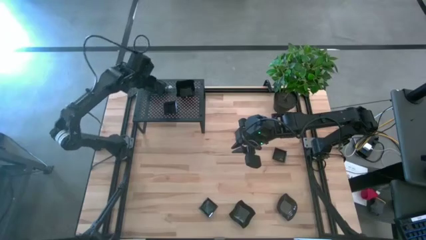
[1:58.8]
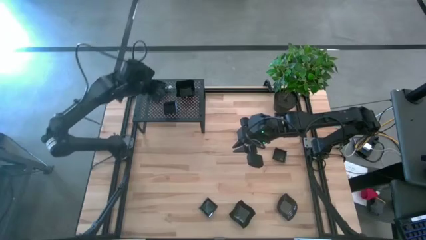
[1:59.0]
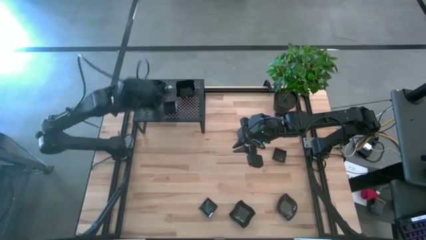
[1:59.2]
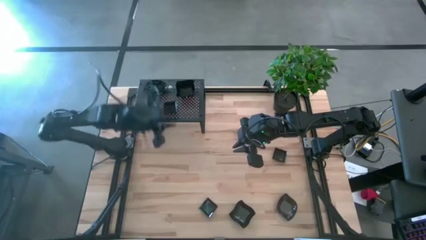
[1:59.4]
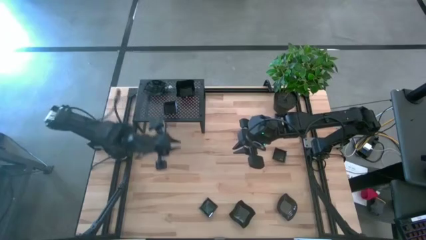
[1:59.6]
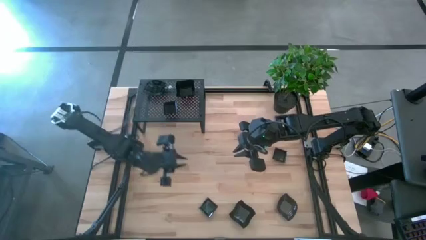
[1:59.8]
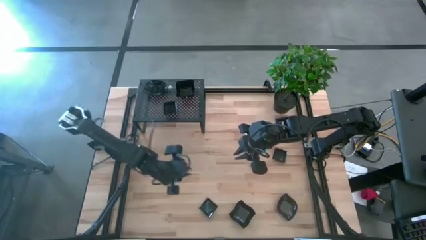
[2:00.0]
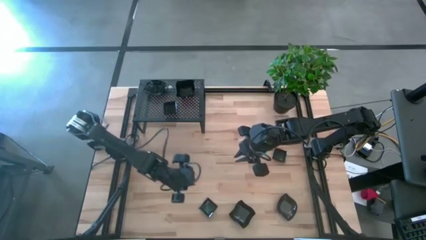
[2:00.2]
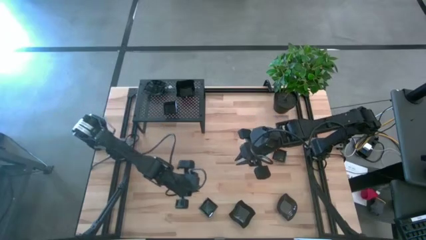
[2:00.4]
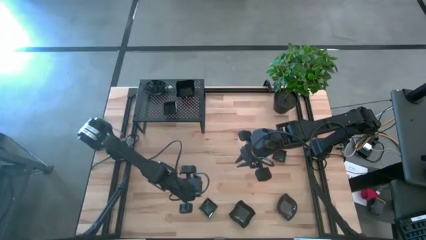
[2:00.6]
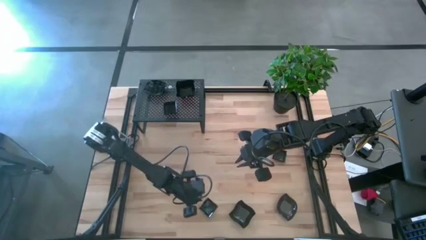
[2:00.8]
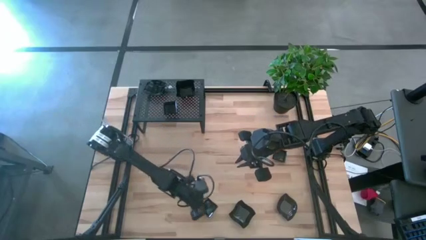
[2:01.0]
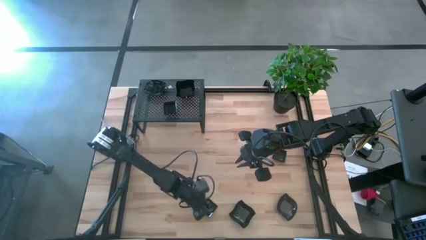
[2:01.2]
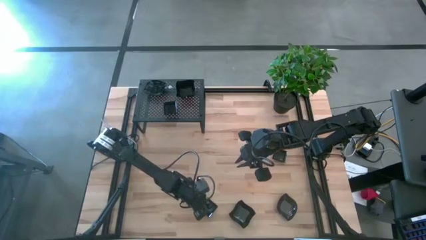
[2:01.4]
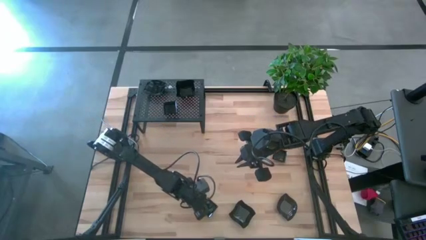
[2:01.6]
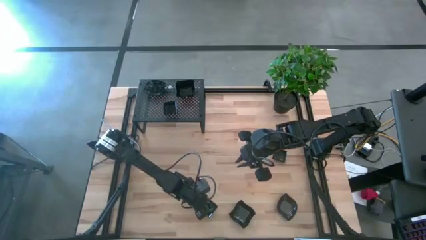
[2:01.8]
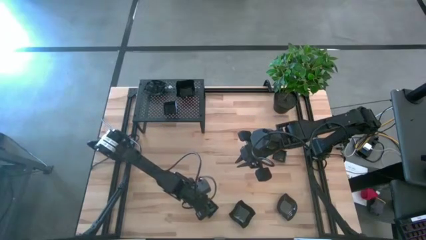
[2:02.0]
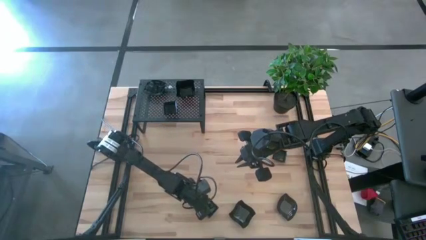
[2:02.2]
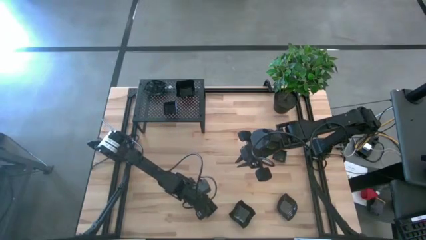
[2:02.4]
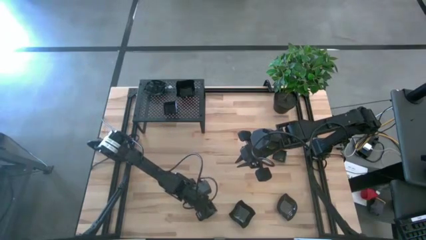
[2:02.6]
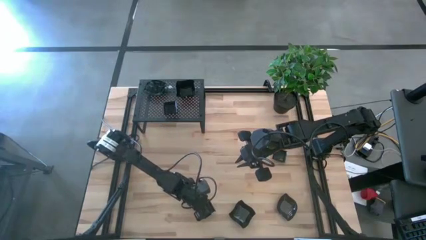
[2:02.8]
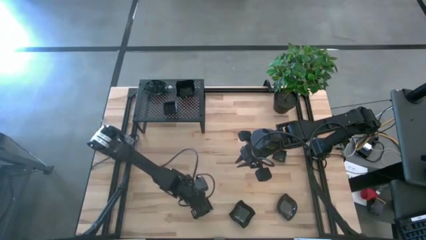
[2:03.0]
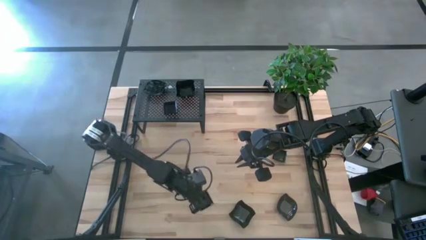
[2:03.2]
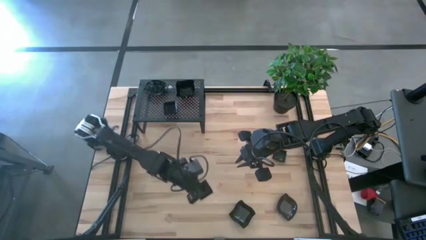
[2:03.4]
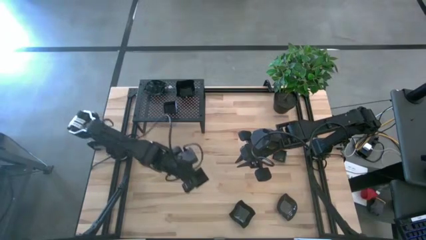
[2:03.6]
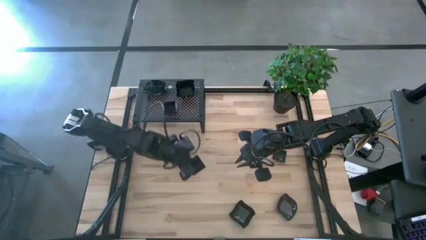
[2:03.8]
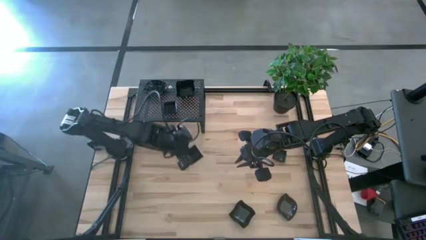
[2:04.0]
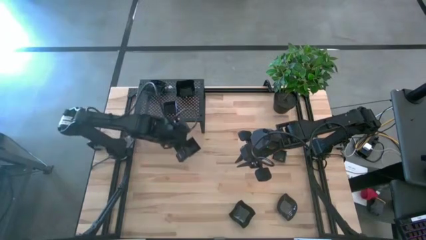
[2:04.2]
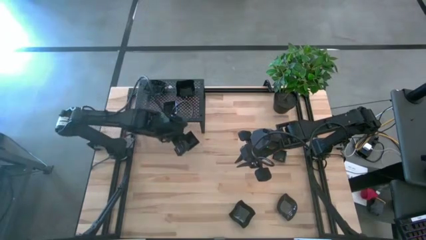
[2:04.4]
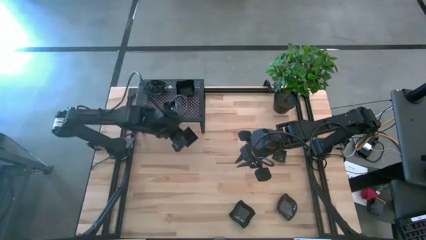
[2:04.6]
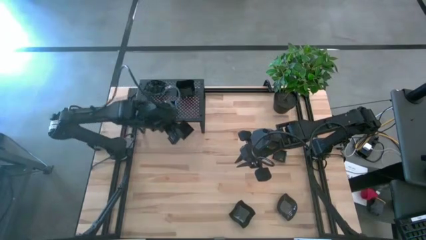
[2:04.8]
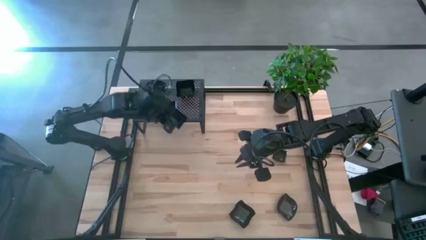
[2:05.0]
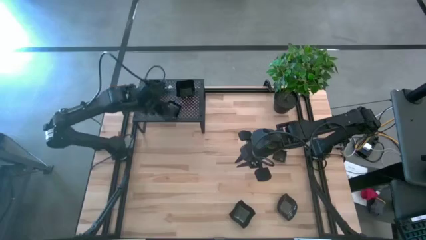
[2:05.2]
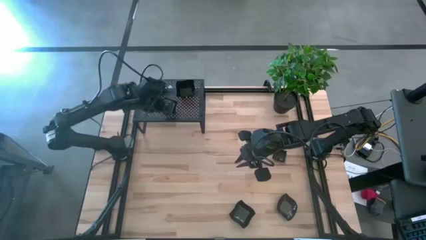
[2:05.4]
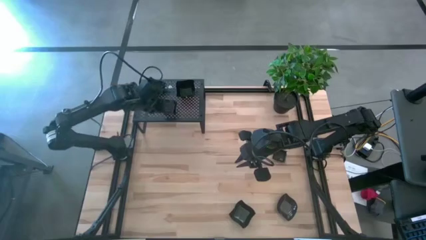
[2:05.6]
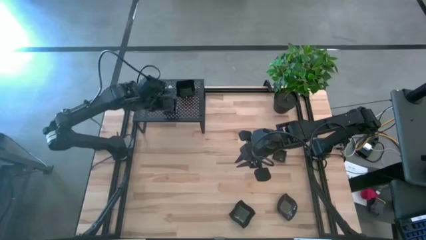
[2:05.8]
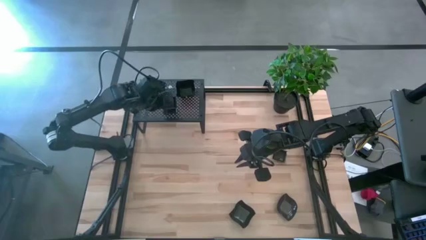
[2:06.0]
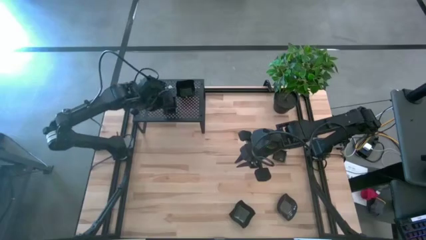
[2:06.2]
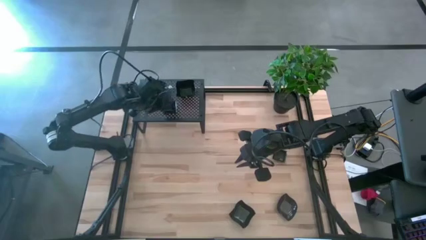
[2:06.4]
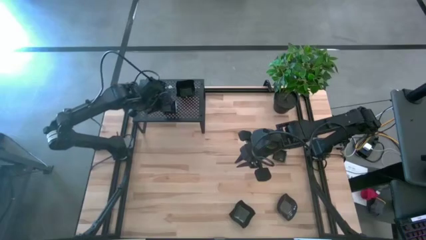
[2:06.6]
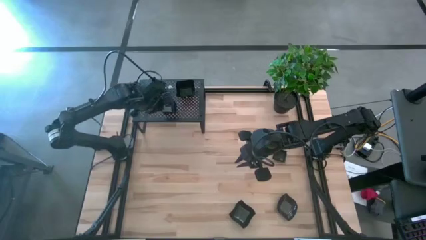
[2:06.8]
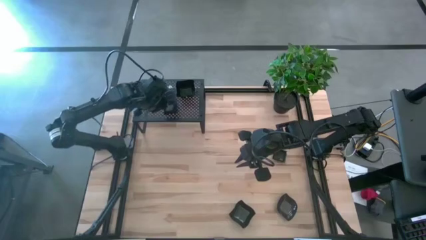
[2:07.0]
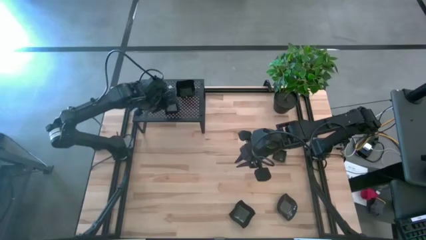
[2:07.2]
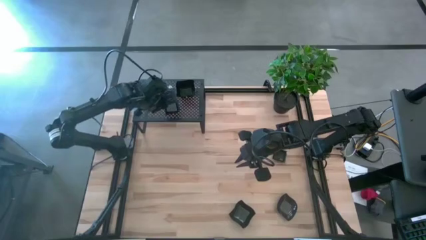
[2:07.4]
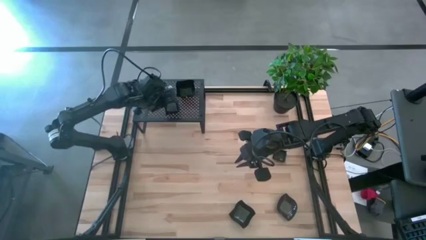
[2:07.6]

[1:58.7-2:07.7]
Task: Pick & Place Mini shaped plates
Stack the square plate on top of the stacked square plate on the shelf

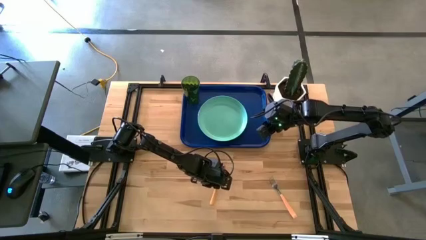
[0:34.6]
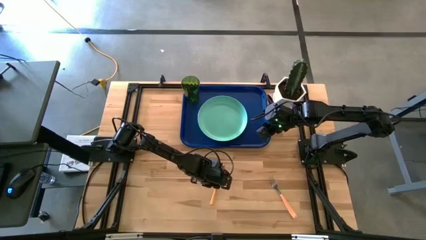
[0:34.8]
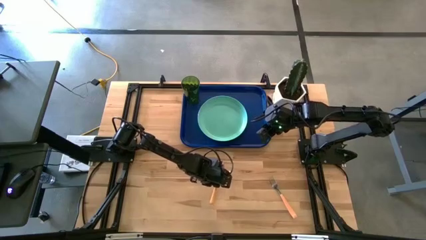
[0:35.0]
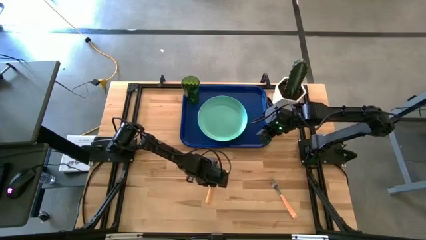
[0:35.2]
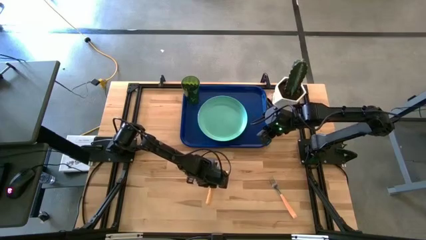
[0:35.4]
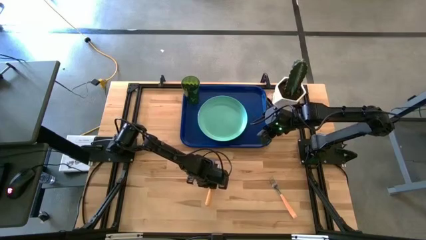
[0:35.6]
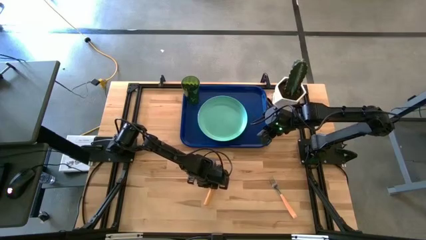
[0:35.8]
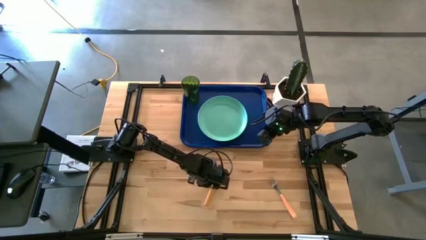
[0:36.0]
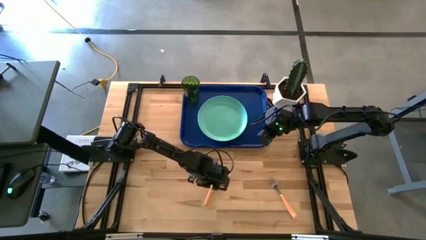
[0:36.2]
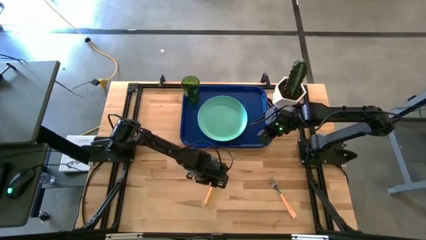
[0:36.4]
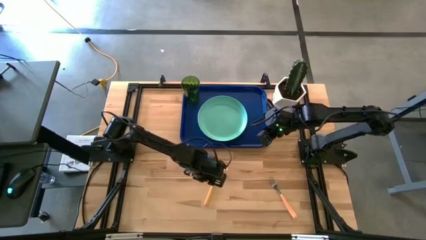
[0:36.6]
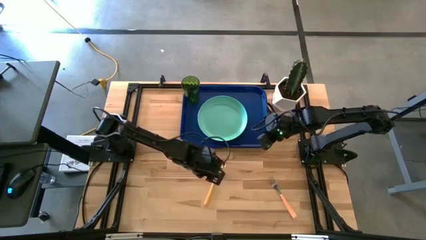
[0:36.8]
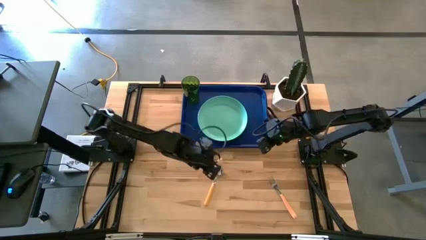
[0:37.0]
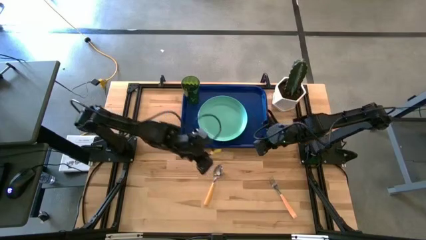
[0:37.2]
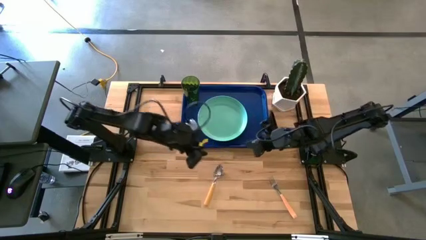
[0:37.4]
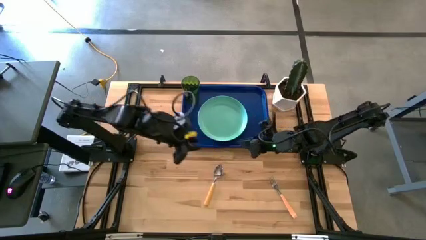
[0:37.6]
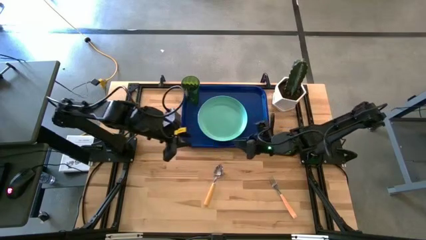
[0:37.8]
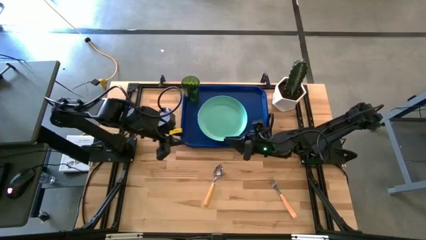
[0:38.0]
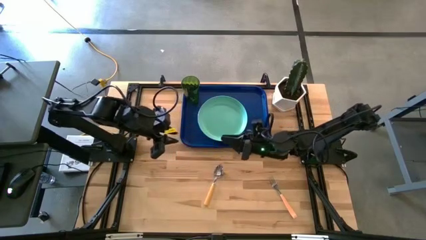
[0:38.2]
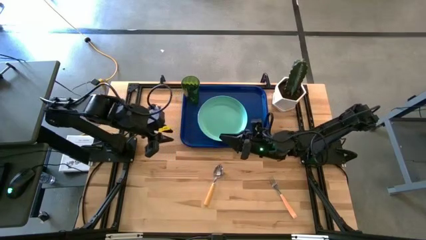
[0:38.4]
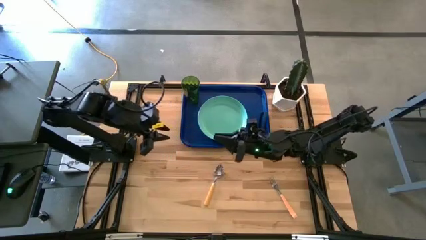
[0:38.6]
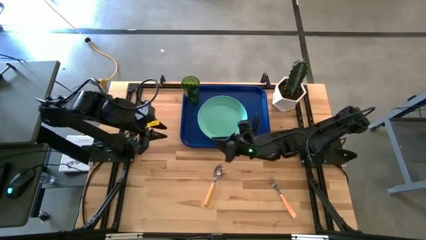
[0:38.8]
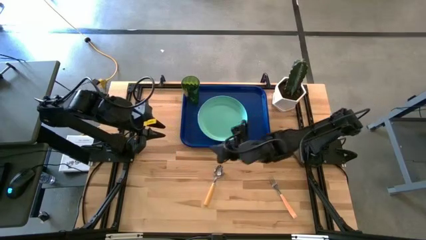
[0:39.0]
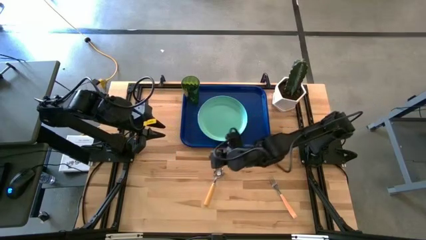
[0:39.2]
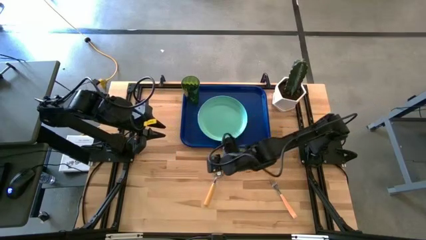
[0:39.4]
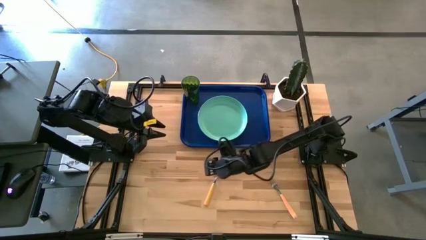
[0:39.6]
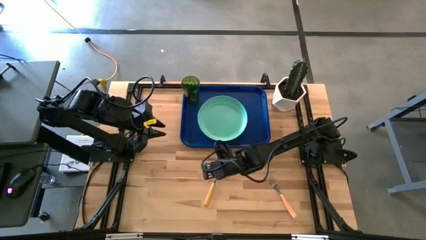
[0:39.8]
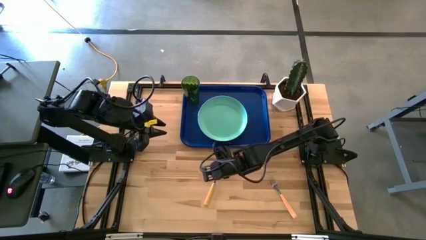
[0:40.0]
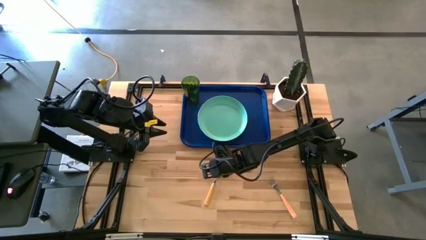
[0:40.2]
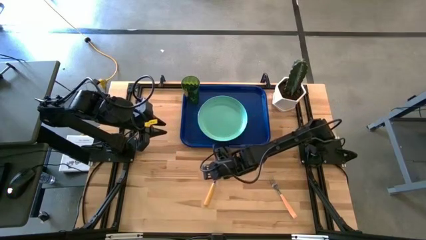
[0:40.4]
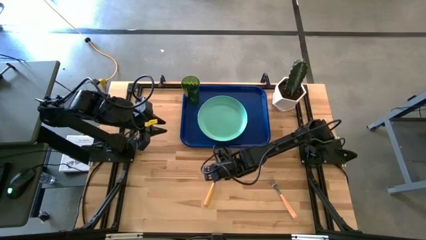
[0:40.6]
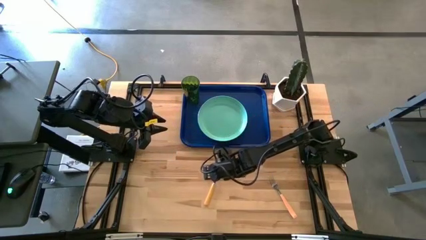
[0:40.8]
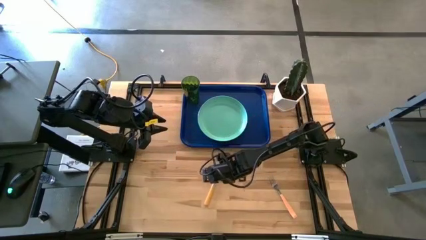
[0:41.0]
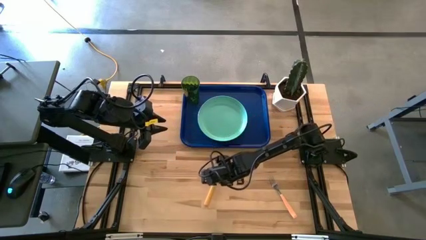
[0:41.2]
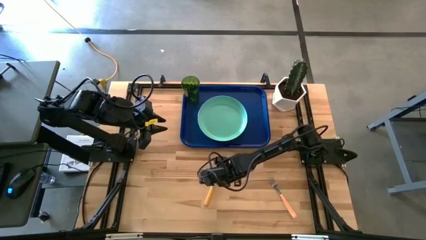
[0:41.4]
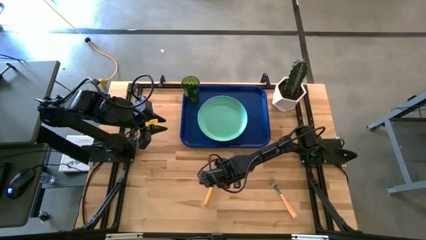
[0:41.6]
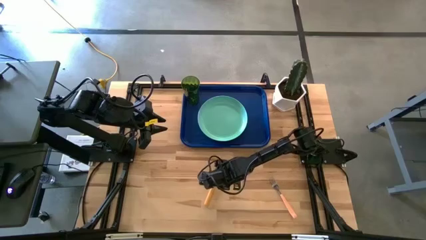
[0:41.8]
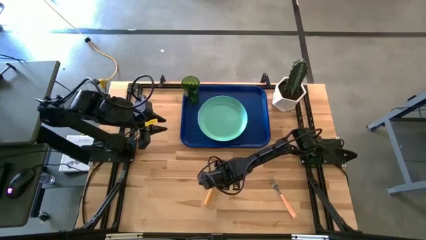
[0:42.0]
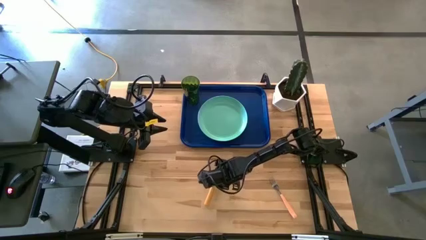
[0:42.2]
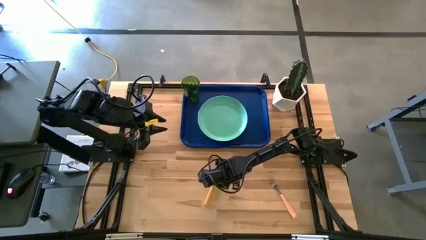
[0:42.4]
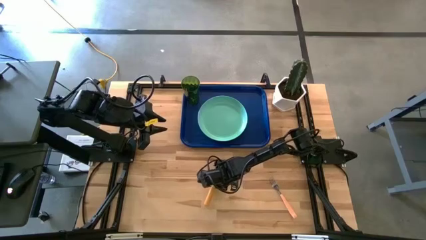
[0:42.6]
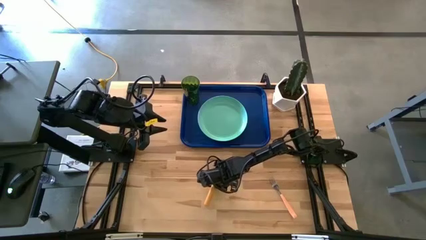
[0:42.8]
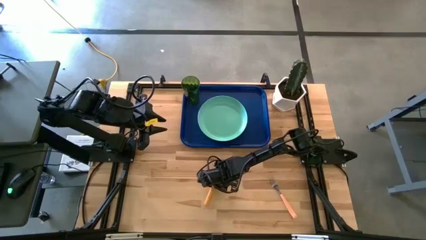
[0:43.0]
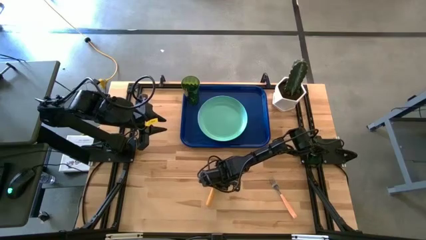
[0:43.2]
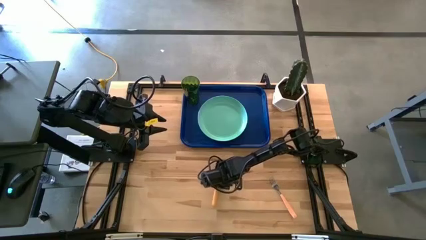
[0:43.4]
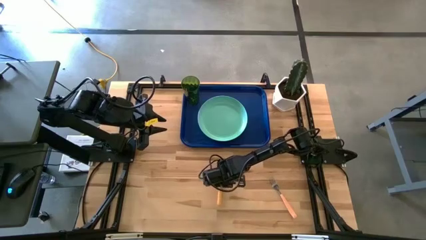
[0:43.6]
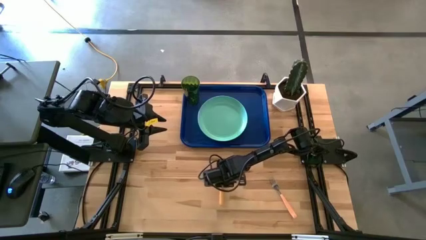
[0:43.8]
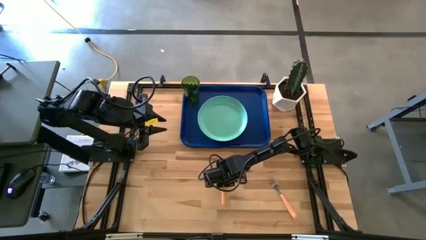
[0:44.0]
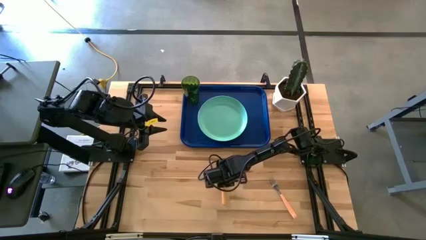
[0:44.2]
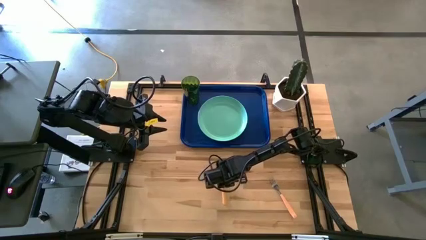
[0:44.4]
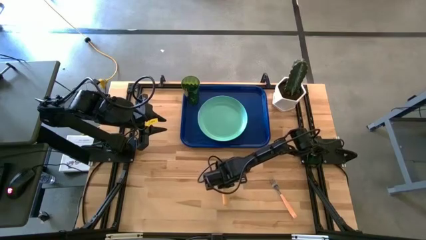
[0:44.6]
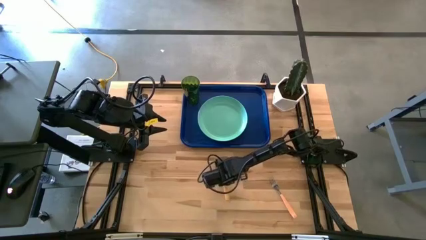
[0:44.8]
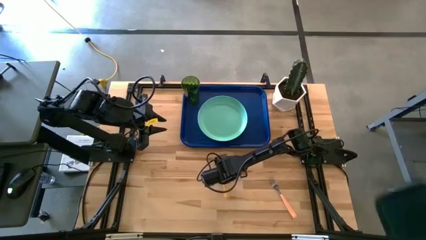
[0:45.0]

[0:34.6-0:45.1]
Task: Pick and place plate/cup/fork/spoon on tray
Put the yellow spoon on the blue serving tray
